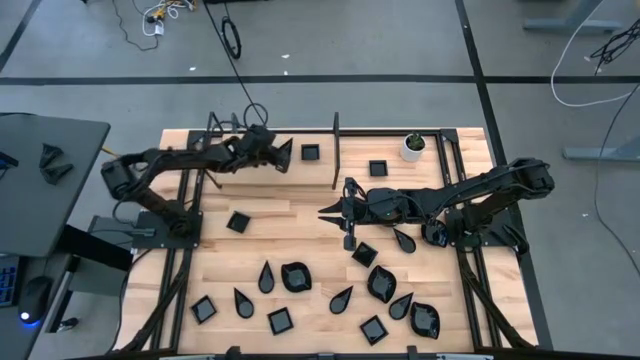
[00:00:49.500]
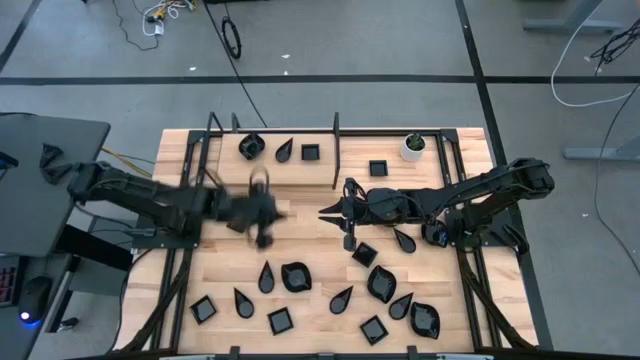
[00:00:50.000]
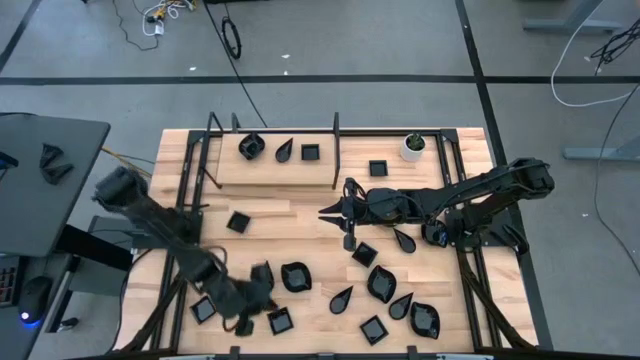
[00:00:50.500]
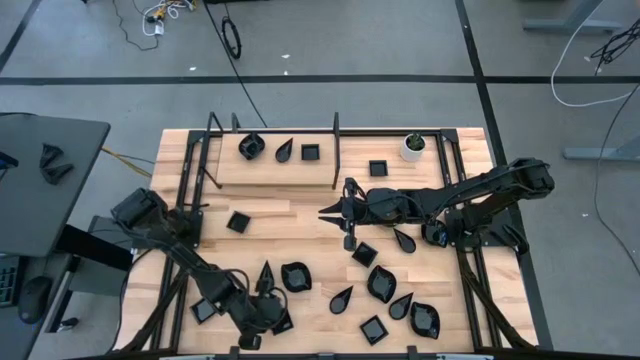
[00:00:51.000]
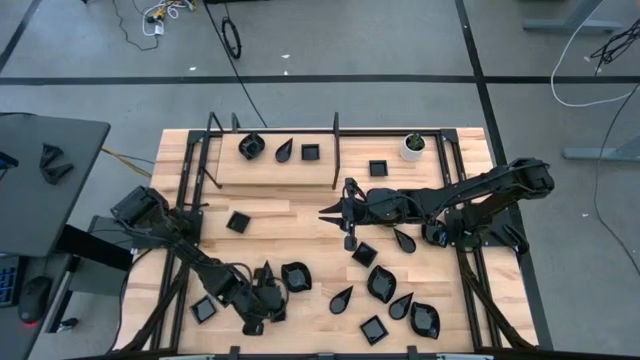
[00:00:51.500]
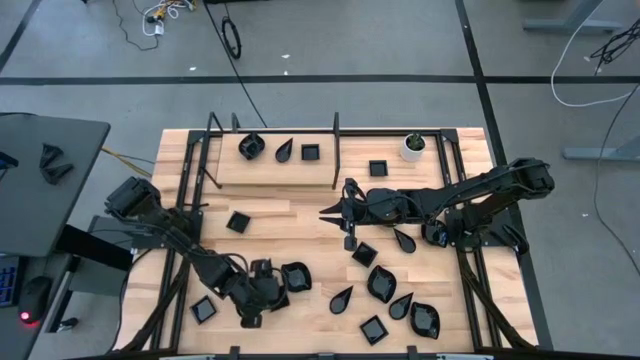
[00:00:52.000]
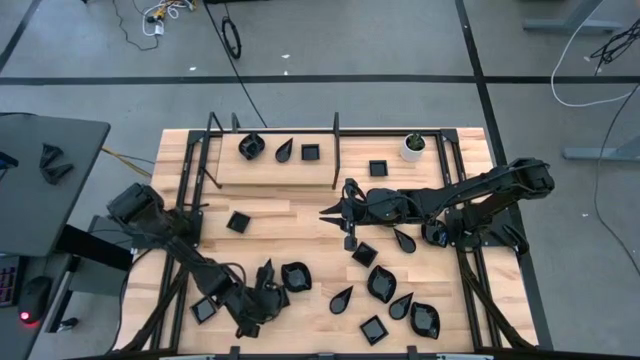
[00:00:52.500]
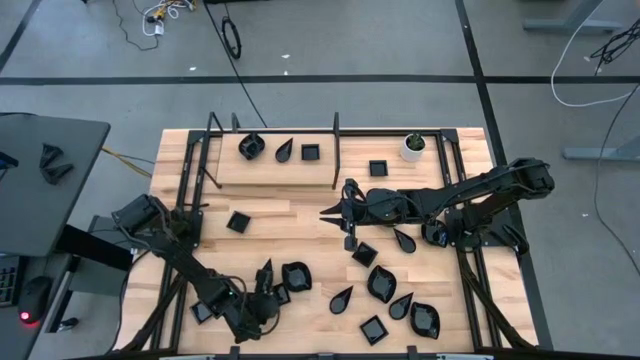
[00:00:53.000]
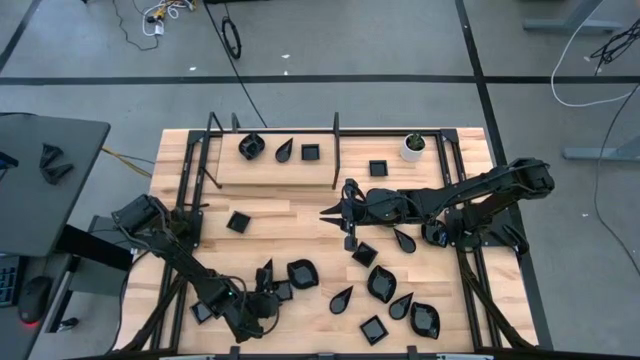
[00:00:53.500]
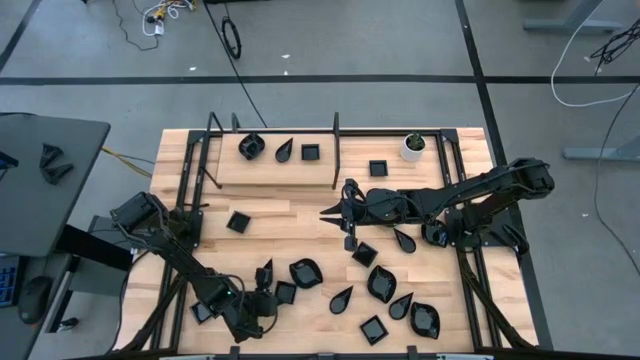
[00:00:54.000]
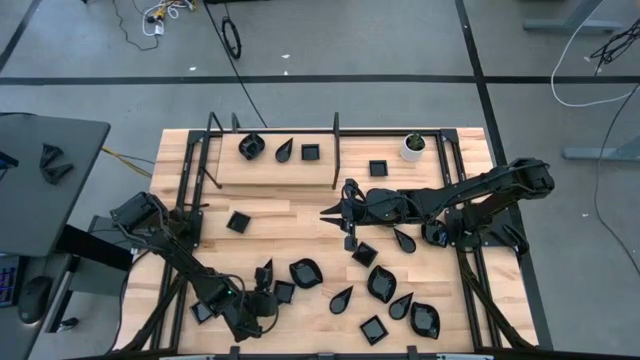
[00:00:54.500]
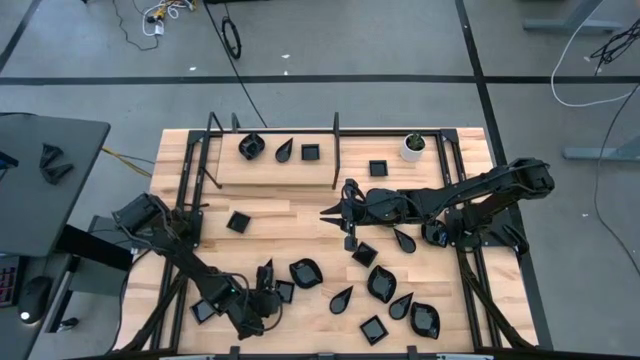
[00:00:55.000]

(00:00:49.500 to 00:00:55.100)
Task: Pick & Place Mini shaped plates
Stack the black square plate on top of the black square plate on the shelf

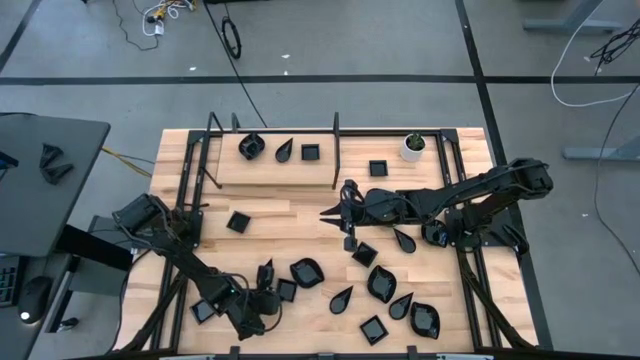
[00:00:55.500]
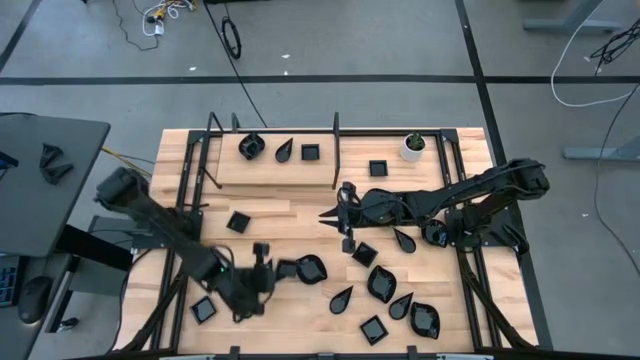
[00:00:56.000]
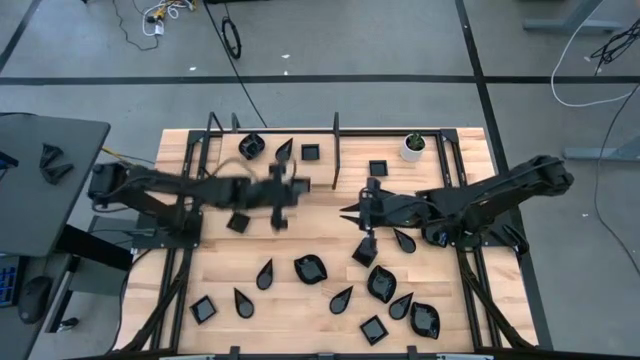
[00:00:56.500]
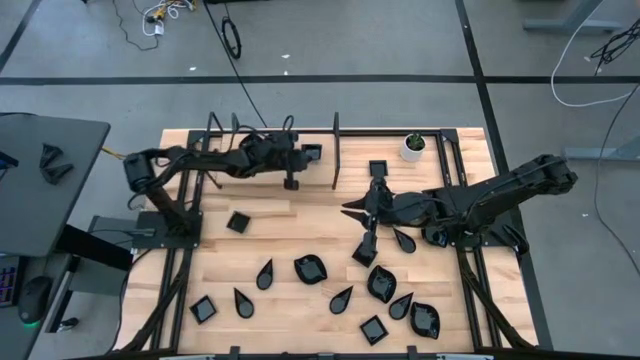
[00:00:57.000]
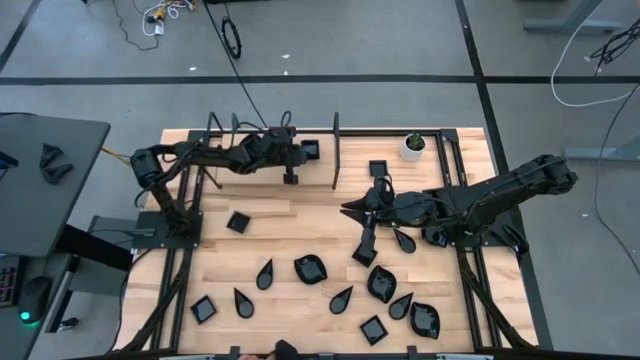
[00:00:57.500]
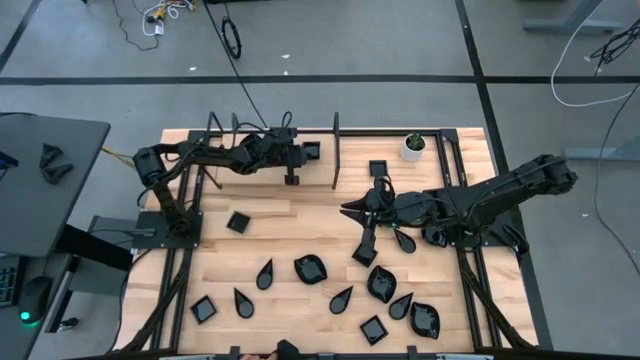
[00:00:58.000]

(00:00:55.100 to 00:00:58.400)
Stack the black square plate on top of the black square plate on the shelf

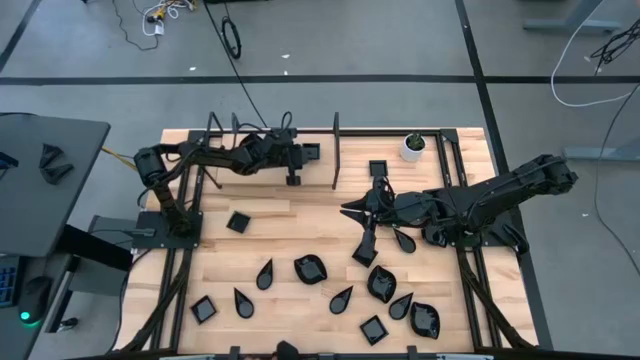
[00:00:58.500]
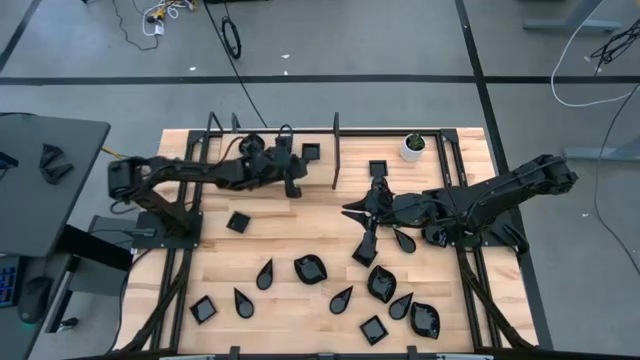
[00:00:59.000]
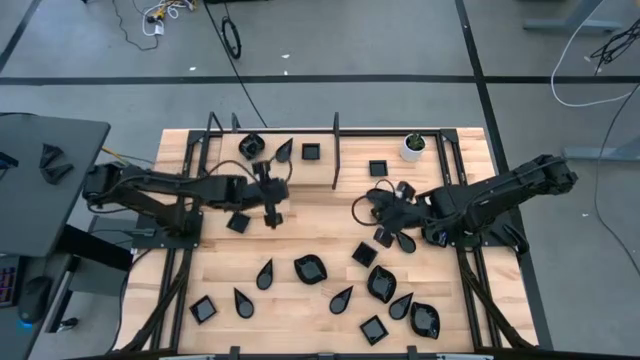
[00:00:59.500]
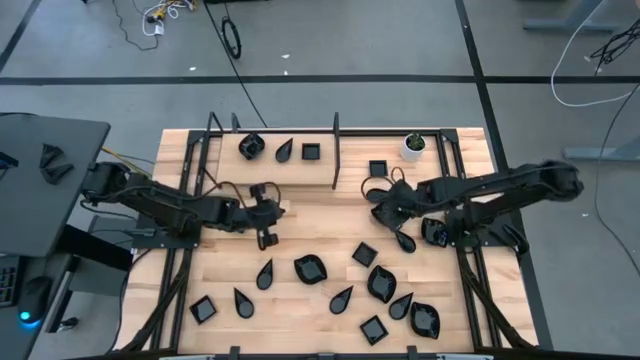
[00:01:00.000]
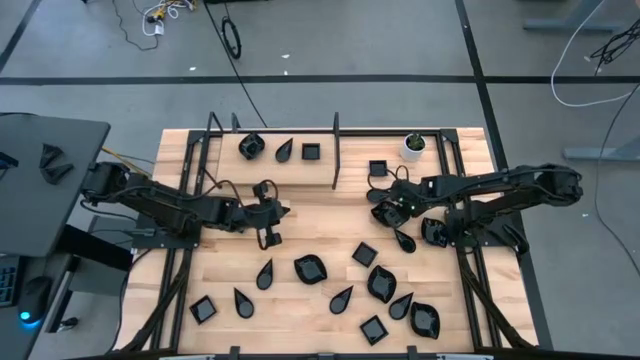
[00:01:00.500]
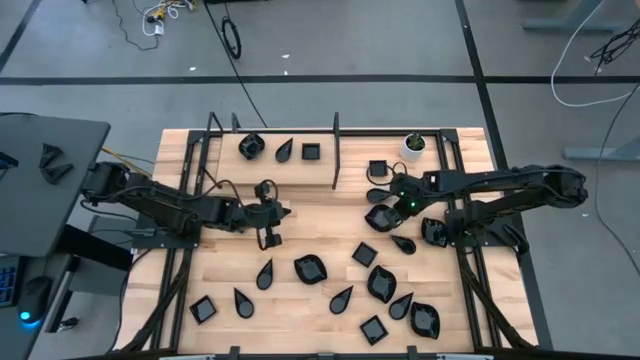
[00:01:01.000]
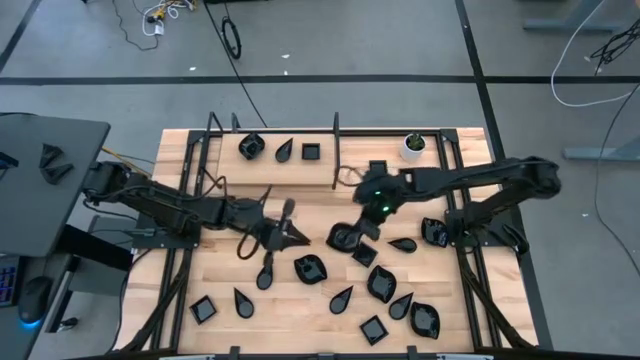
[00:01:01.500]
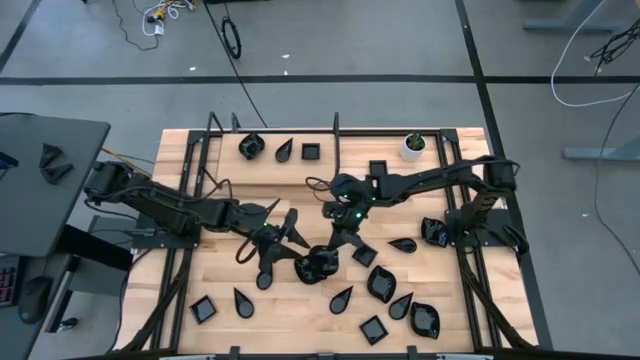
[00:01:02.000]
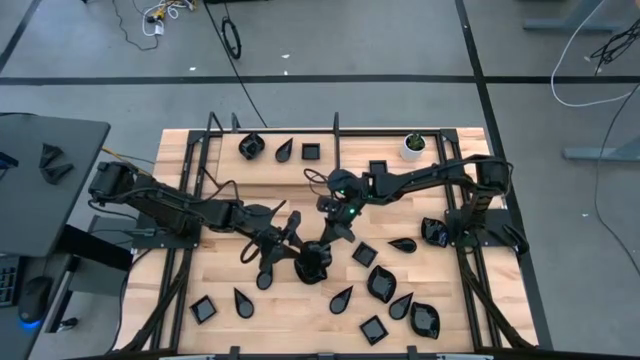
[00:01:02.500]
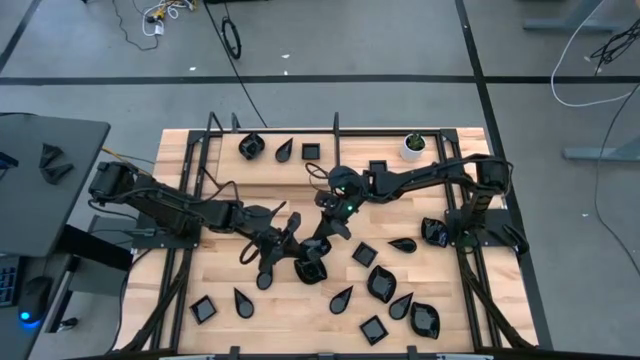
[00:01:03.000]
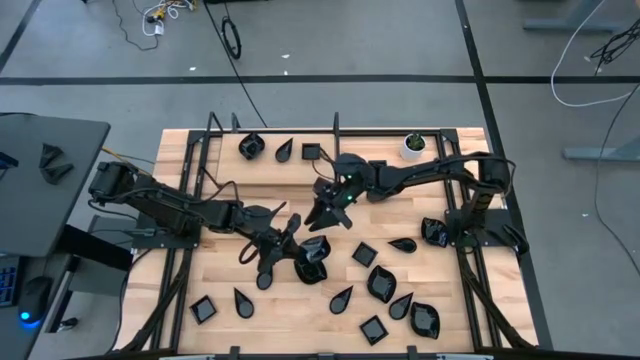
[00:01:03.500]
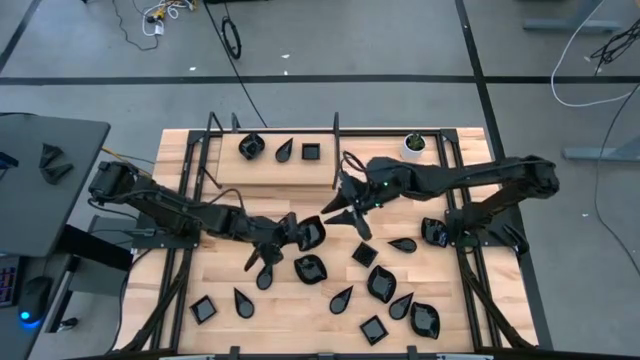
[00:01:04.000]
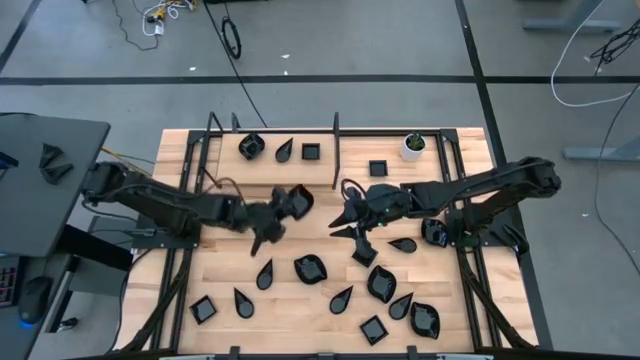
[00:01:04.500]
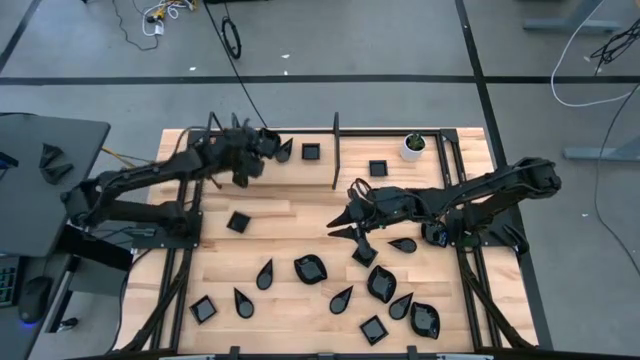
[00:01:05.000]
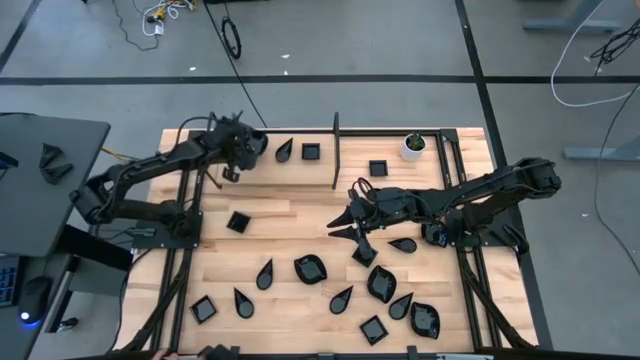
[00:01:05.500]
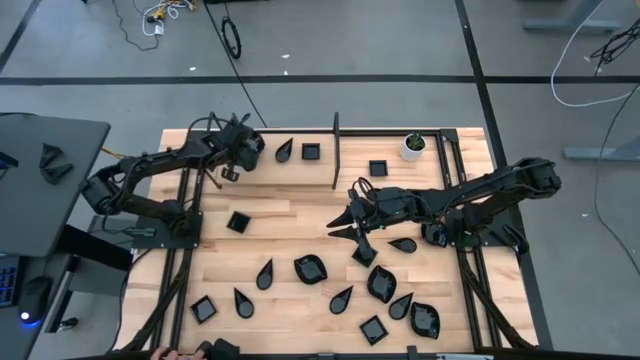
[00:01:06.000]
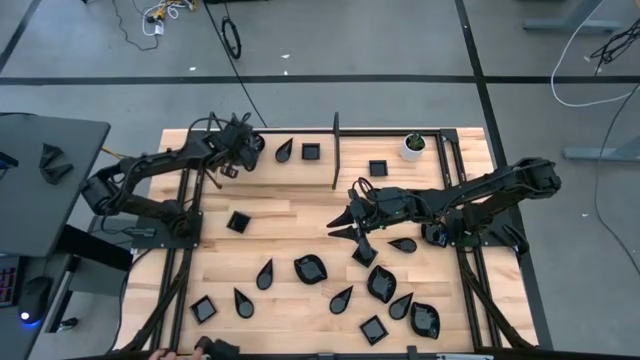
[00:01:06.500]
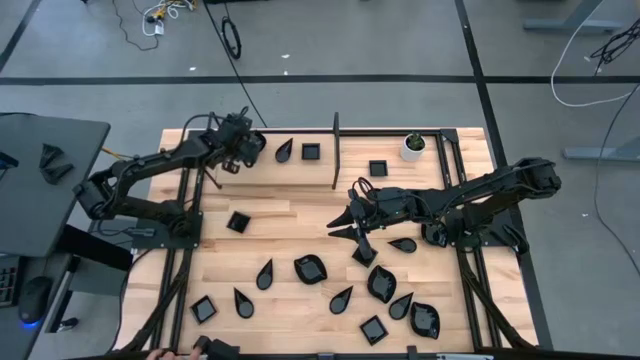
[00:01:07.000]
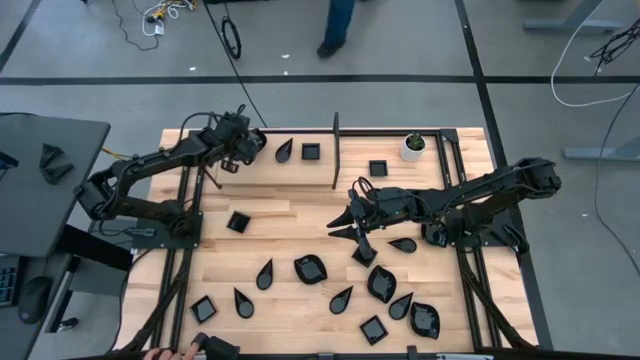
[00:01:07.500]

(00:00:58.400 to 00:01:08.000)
Stack the black leaf-shaped plate on top of the stacked black leaf-shaped plates on the shelf

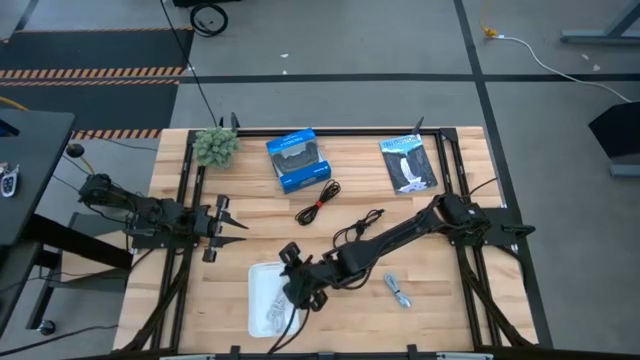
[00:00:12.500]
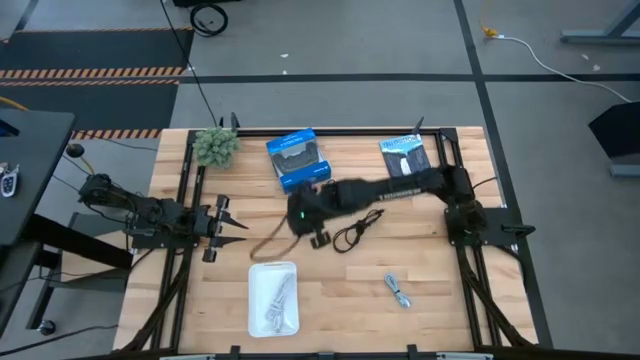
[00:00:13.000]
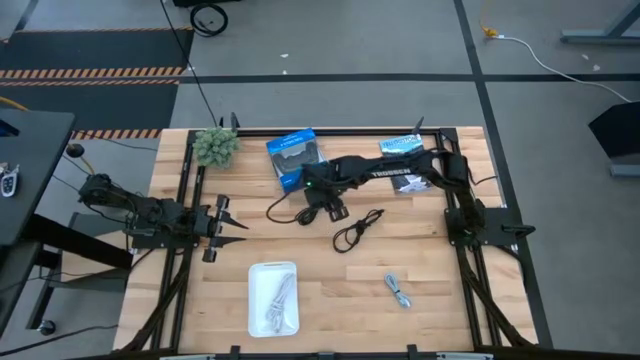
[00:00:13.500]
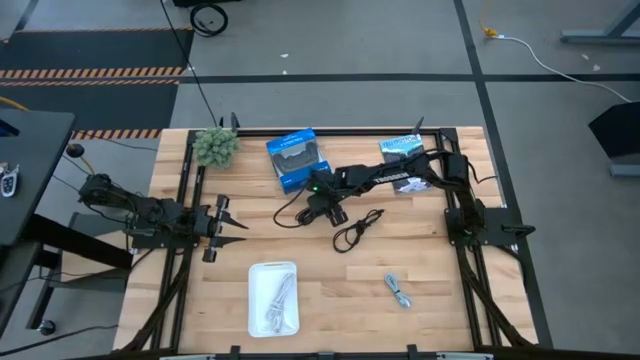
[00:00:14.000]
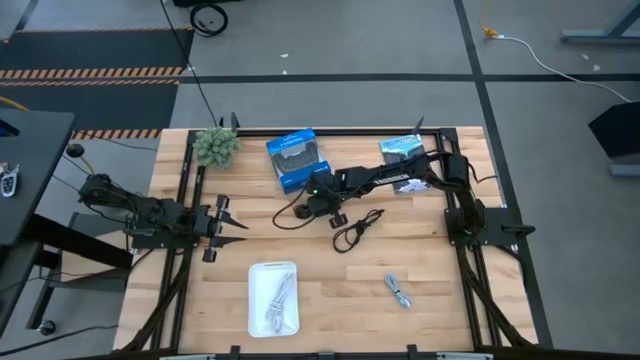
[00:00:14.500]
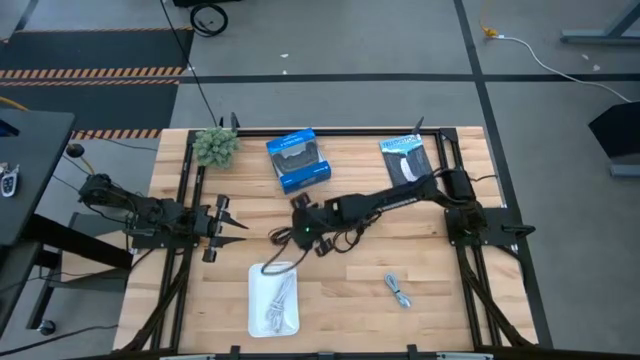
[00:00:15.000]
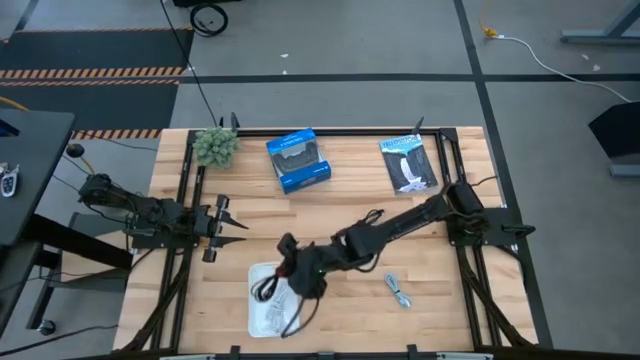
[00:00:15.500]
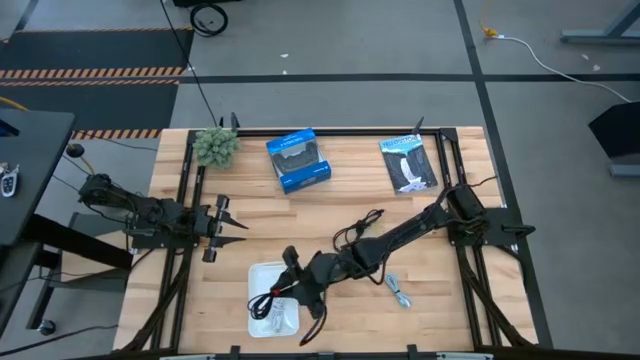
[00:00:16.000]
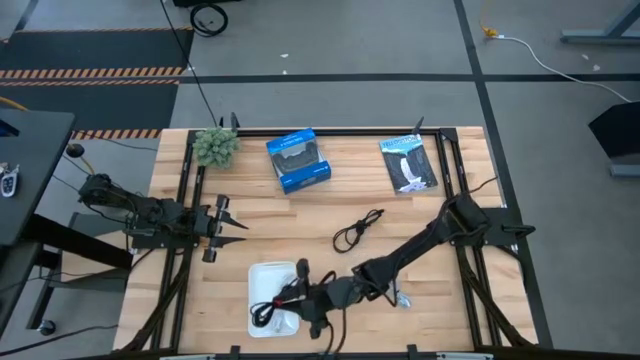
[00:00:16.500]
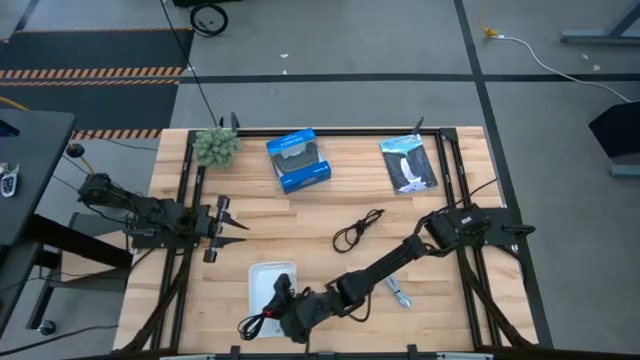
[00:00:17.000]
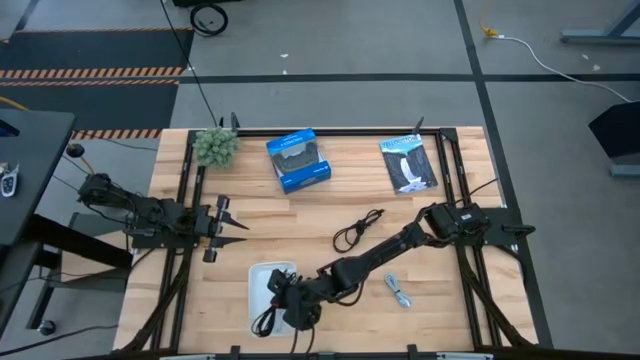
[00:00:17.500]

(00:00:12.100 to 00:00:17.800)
Task: Pick and place USB-C Cables
Put the top black charger cable into the white bin
